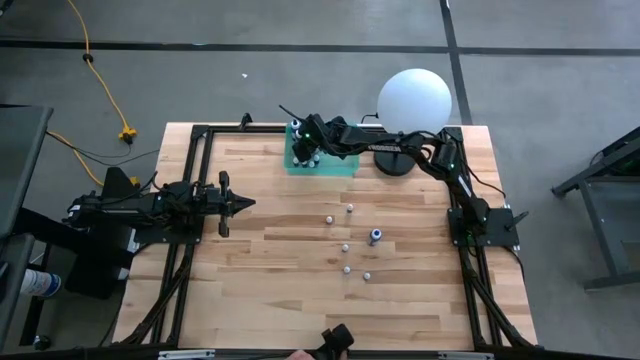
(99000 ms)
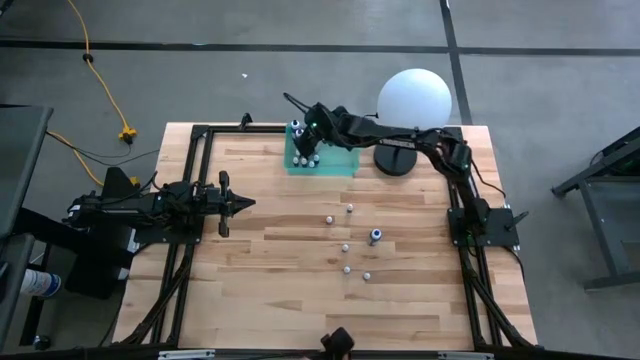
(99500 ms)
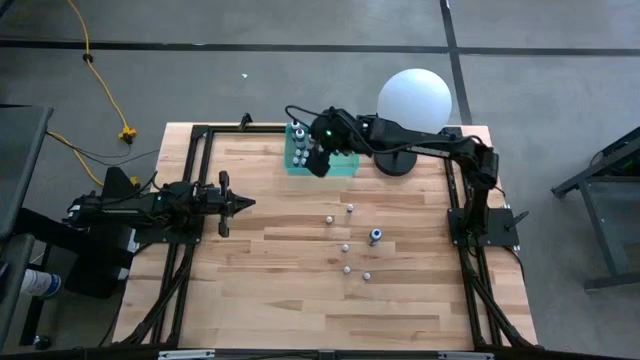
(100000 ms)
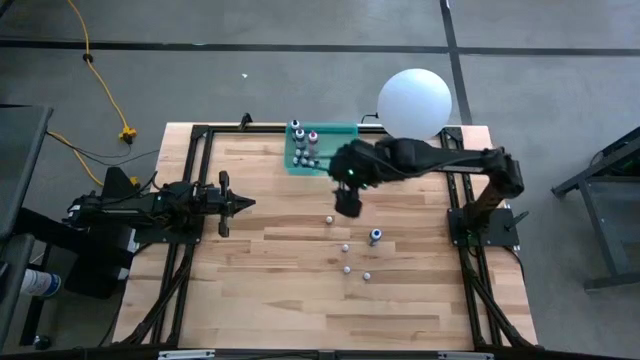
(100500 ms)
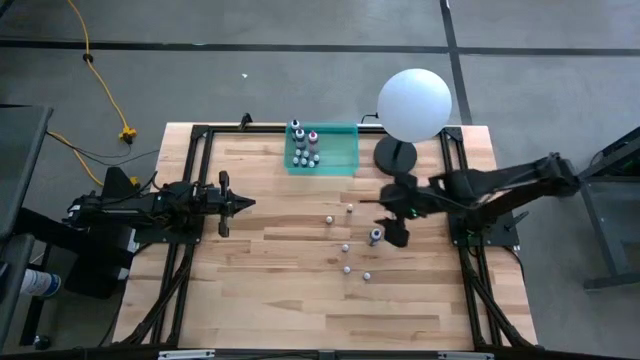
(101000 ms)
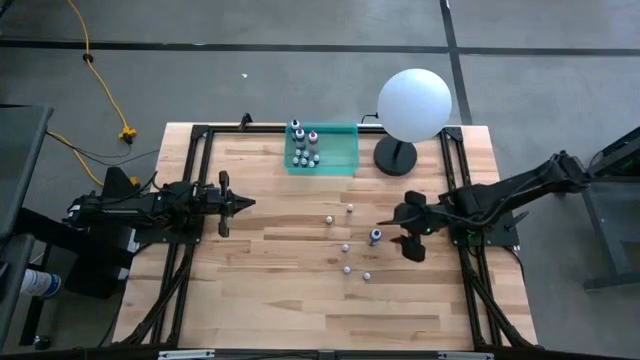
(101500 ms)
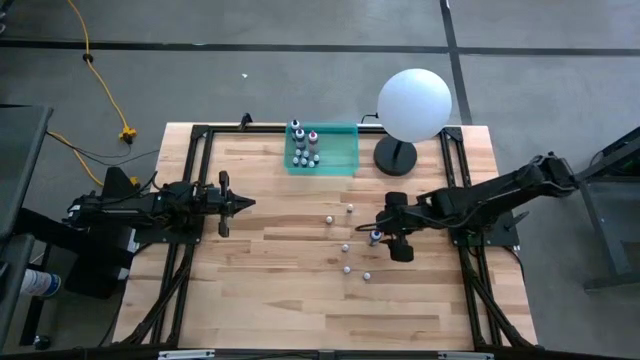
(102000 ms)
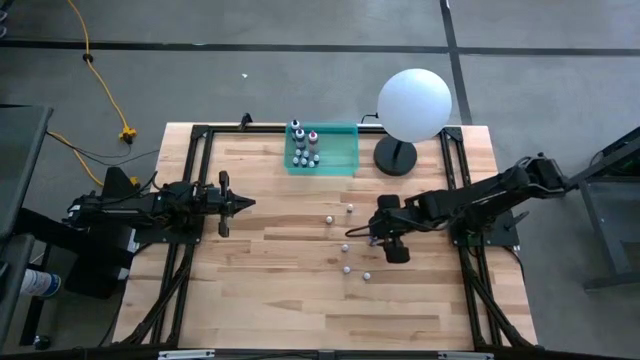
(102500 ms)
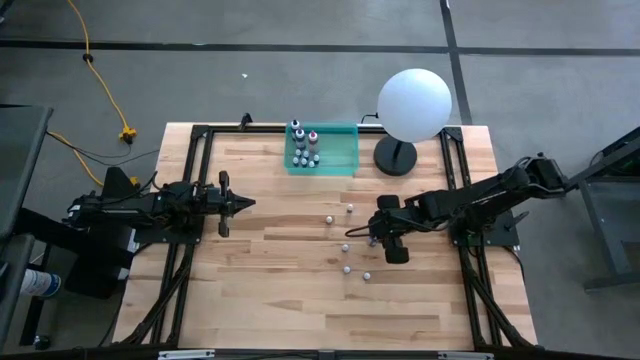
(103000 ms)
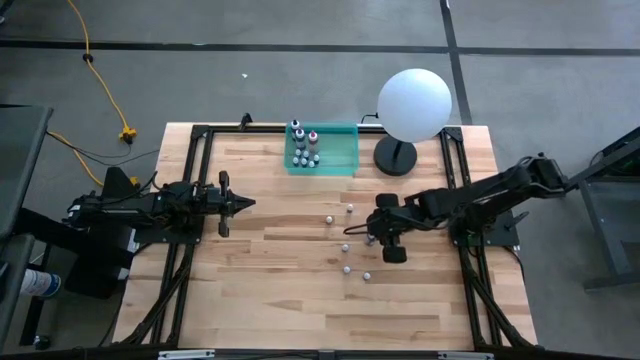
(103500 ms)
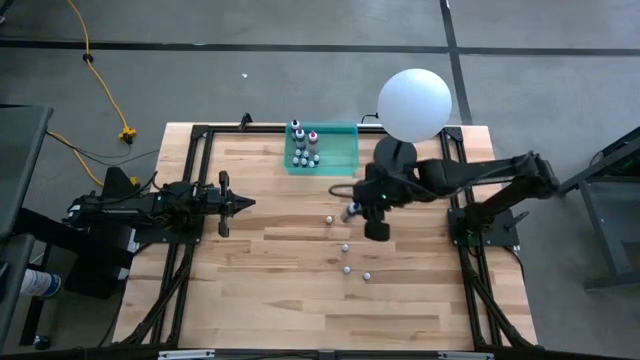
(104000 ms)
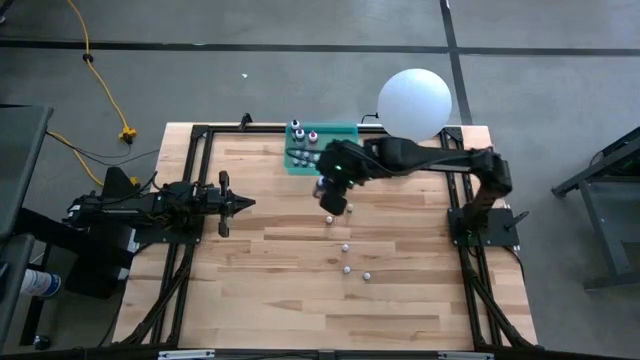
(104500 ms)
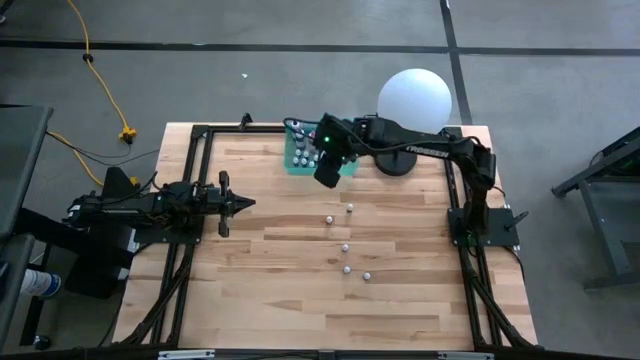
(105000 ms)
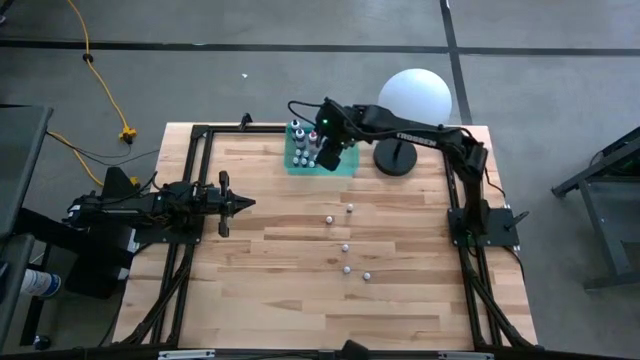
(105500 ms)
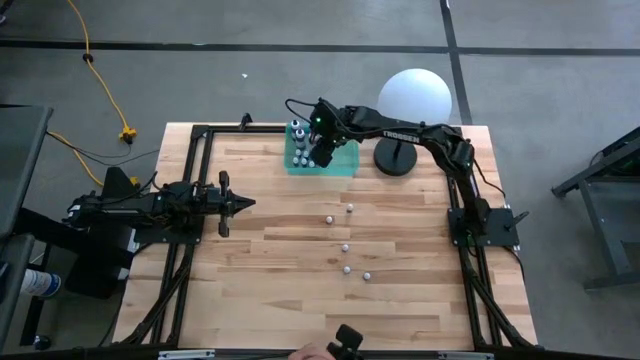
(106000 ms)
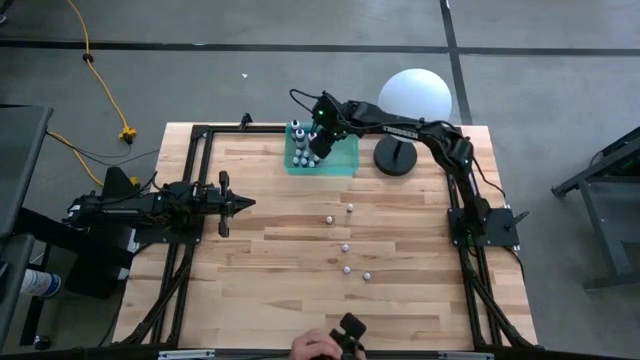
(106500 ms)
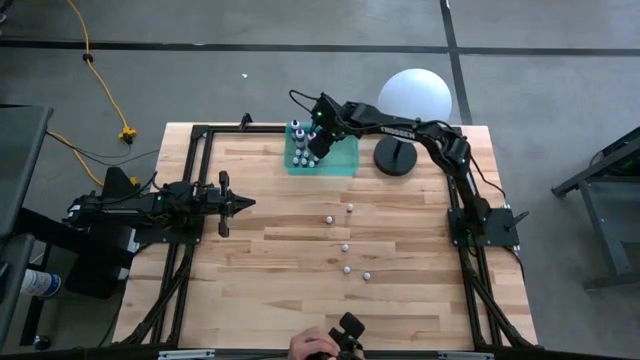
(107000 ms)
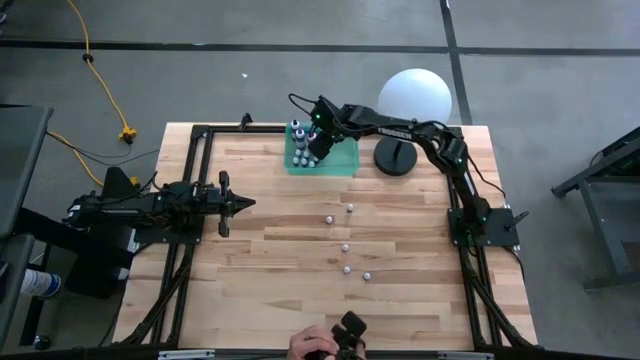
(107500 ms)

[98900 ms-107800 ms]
Task: Pick & Place food coloring
Put the big blue food coloring bottle into the bin

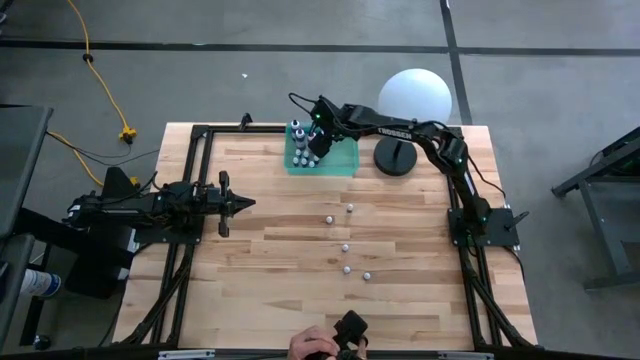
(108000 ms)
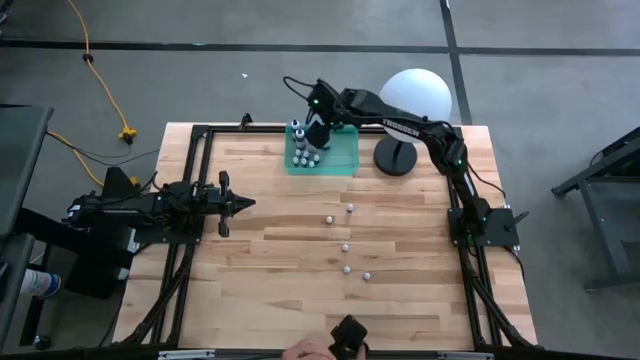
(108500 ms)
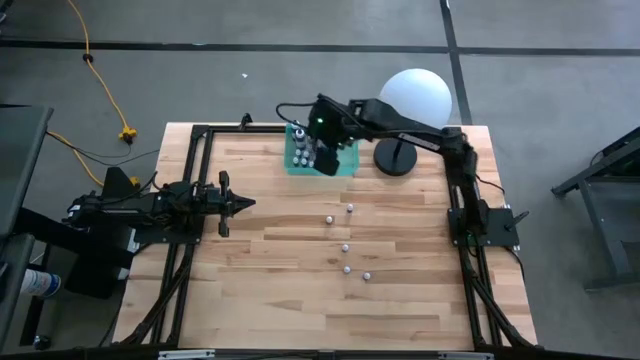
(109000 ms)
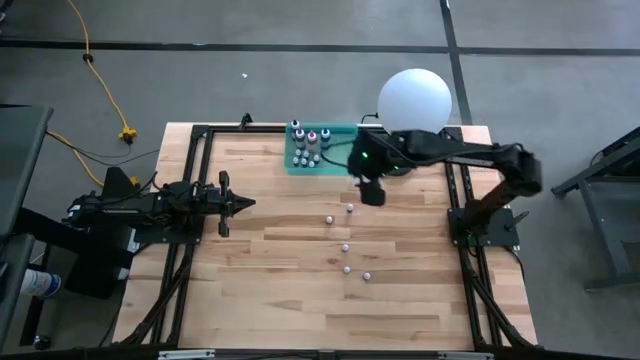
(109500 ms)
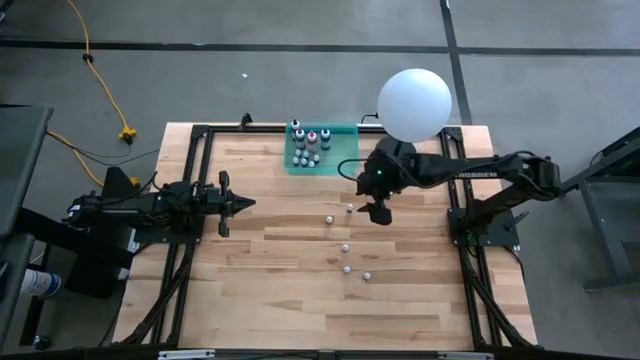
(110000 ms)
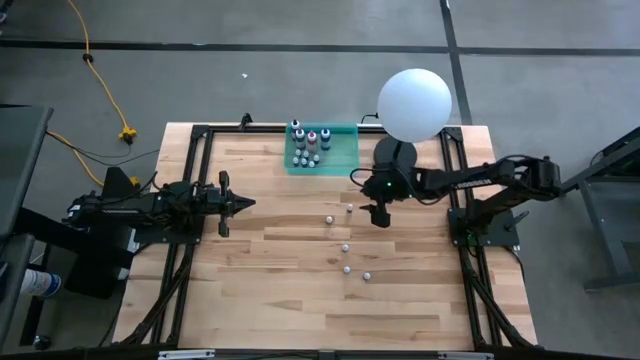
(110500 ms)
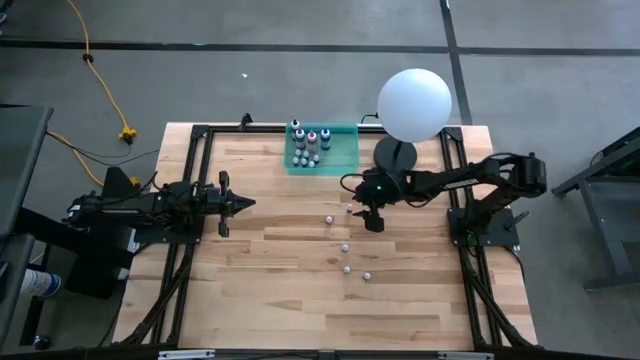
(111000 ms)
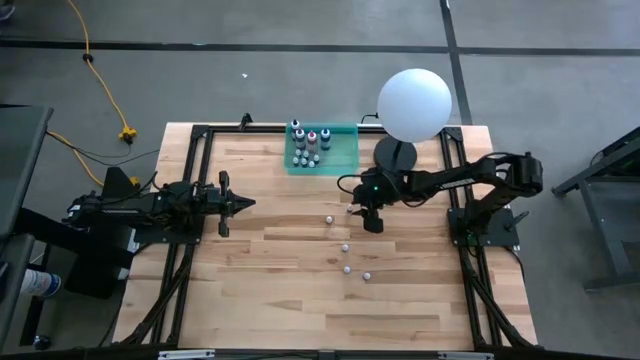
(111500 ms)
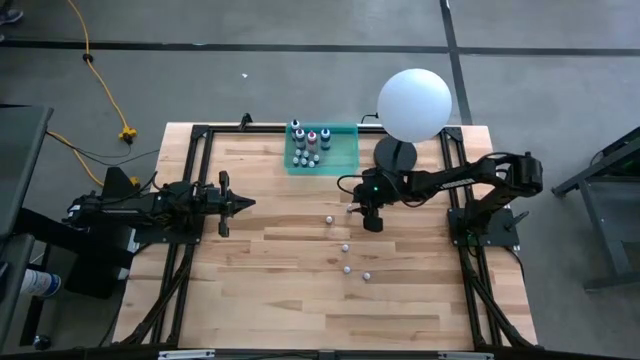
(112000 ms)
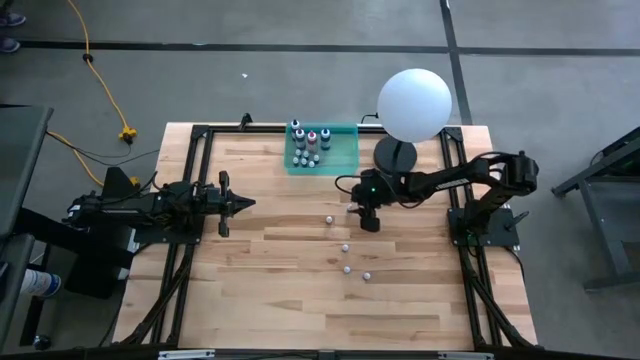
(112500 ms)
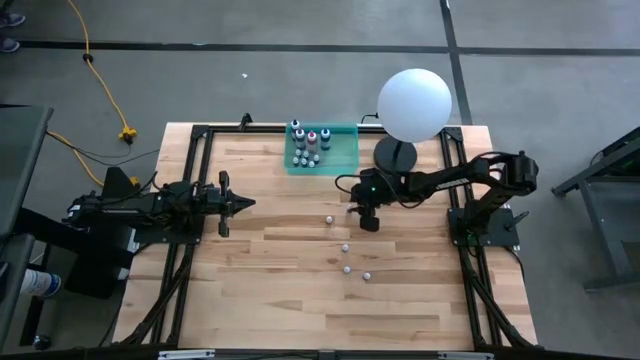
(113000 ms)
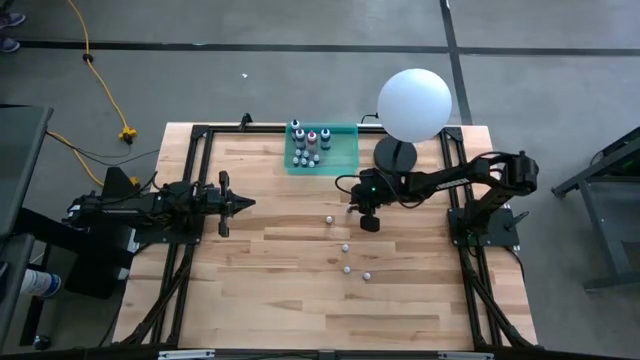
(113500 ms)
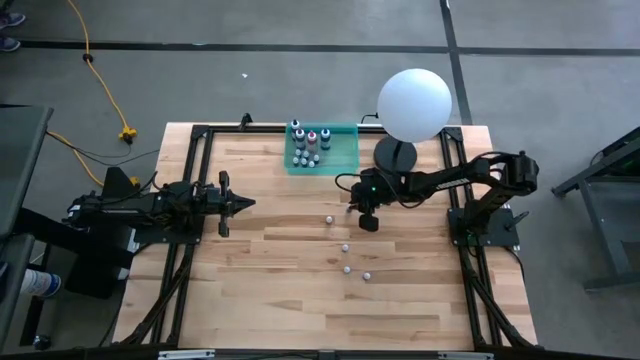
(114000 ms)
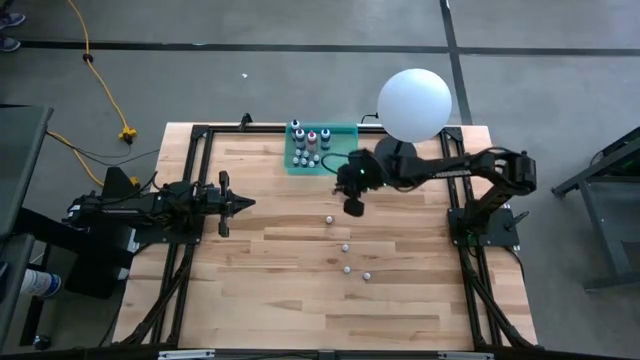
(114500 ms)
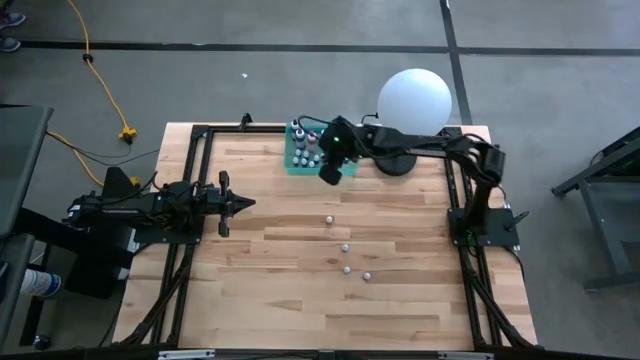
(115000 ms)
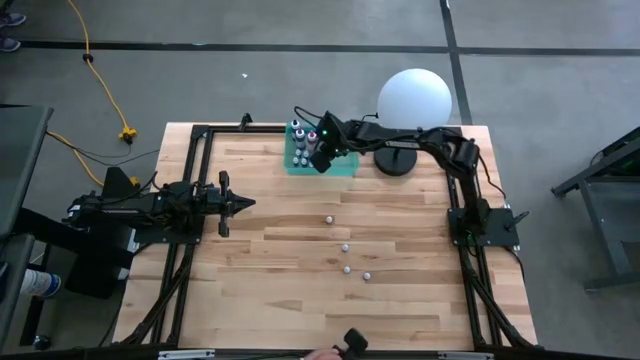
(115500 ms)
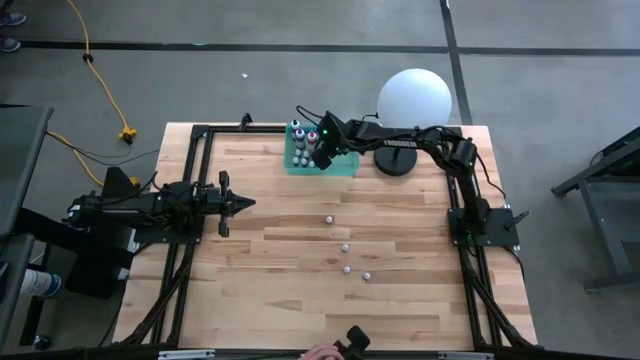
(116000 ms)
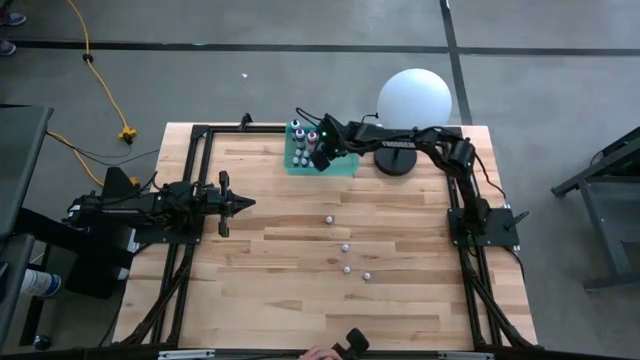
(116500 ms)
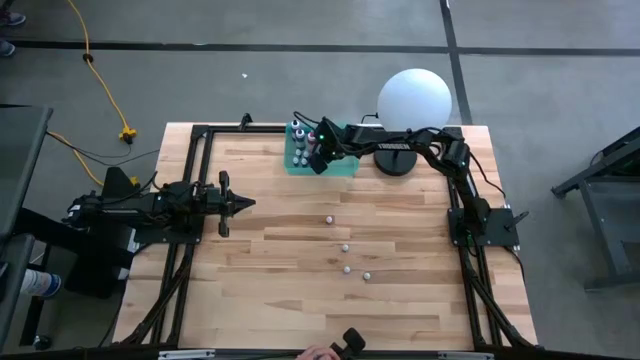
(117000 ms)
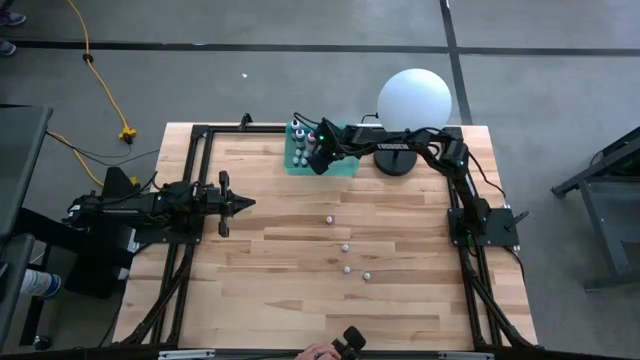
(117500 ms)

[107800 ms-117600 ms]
Put the small red food coloring bottle into the bin

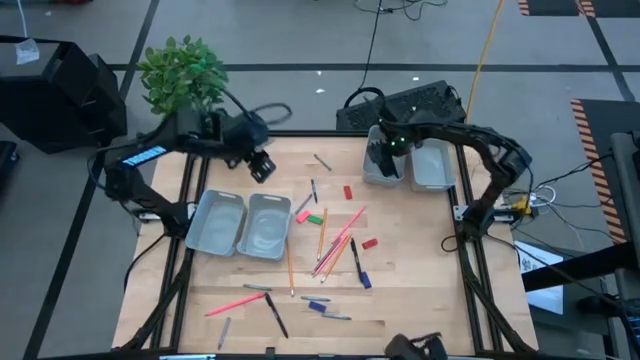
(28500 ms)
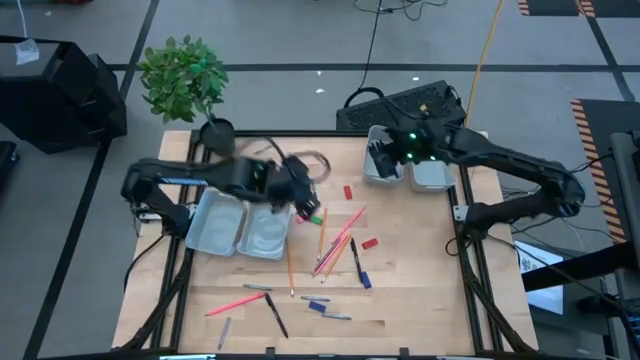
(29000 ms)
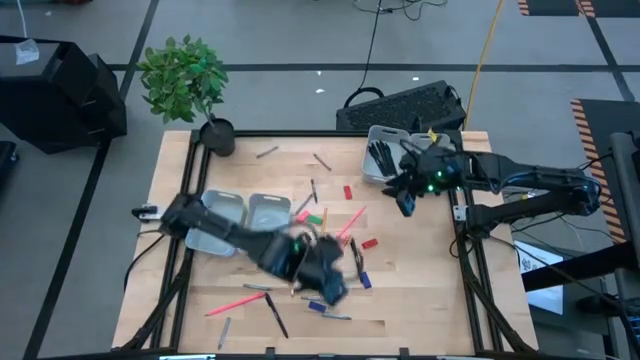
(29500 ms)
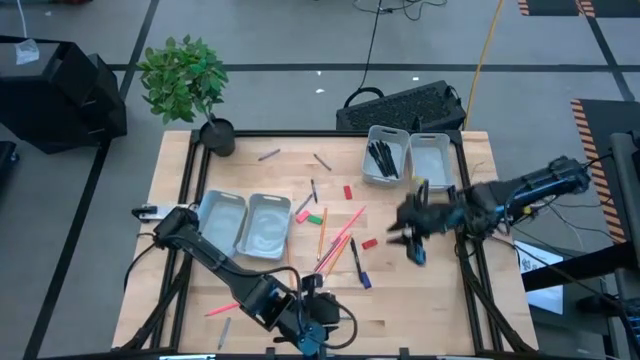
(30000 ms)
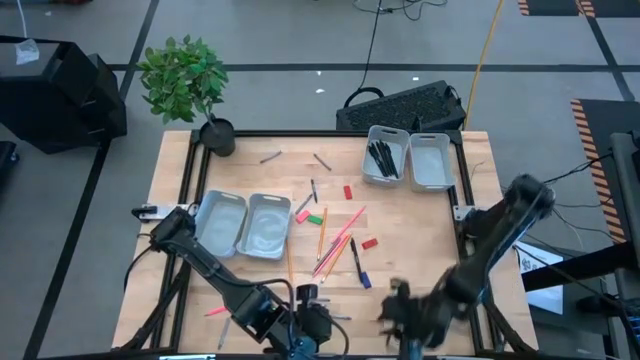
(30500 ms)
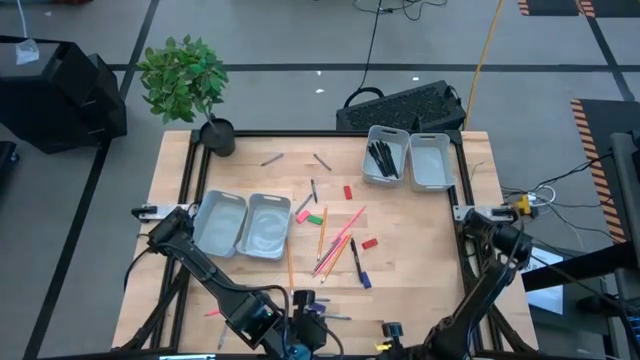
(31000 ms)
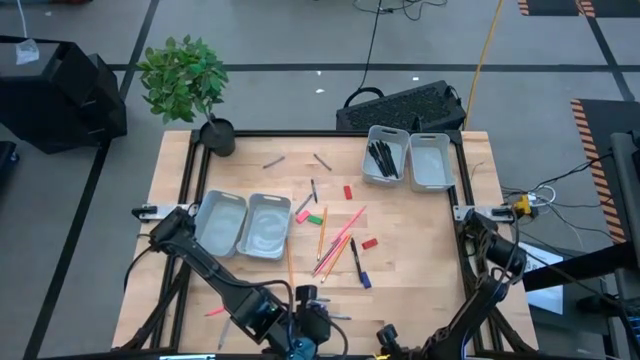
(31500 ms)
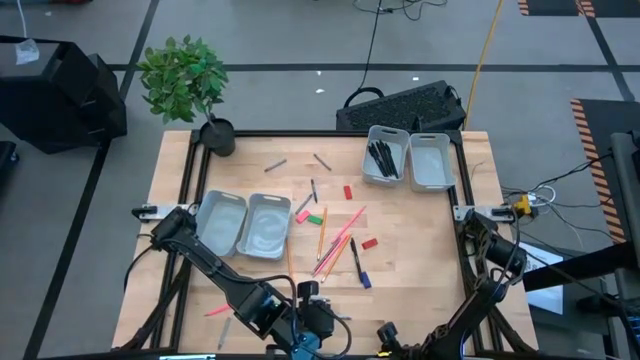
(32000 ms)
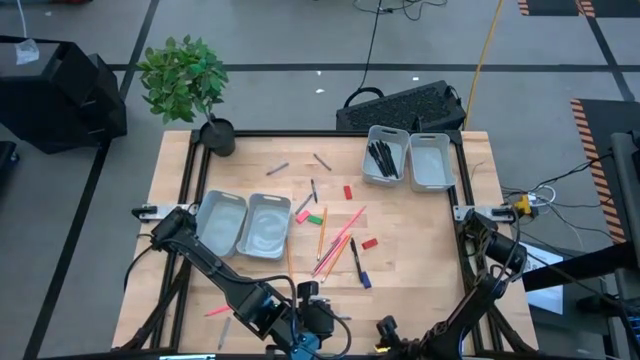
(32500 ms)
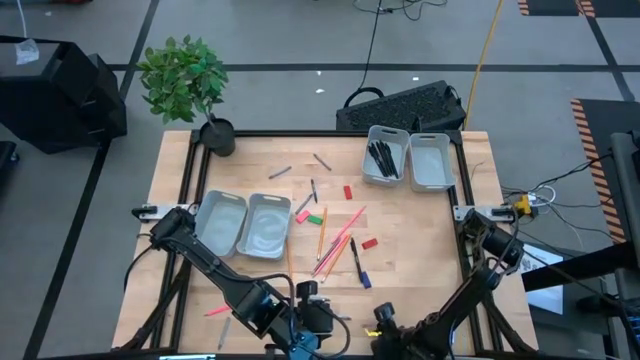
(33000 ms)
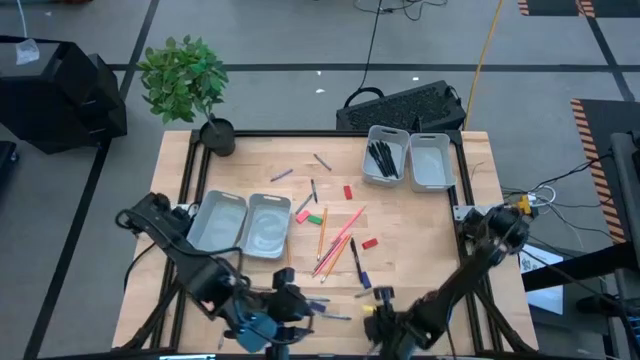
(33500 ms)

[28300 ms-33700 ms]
Task: Sort crayons/erasers/pens/pencils in bins
Put the gray crayon into the top right gray bin
